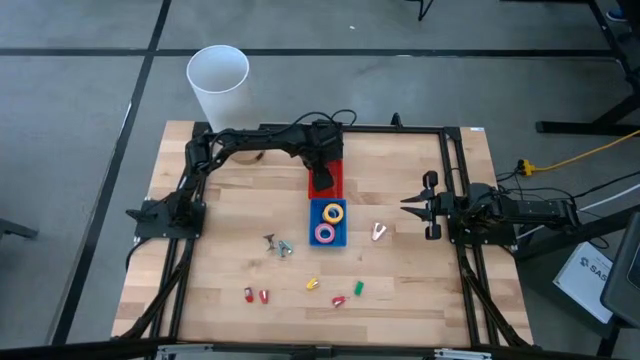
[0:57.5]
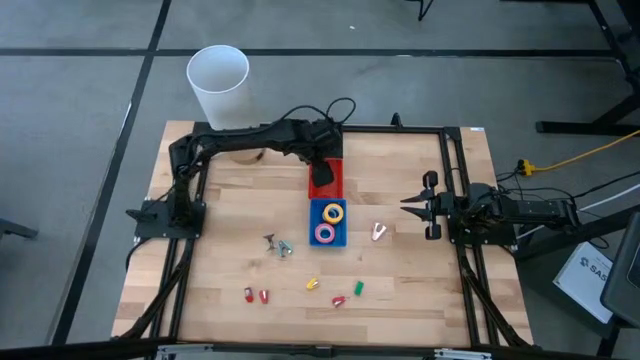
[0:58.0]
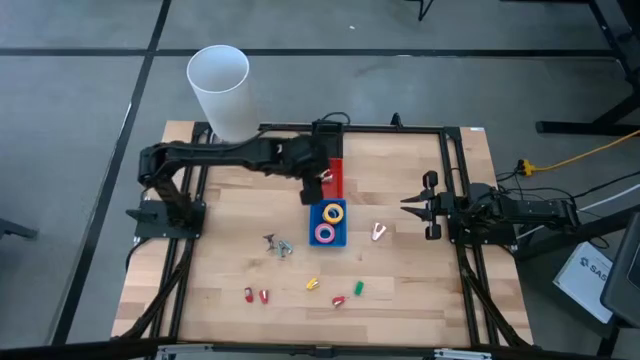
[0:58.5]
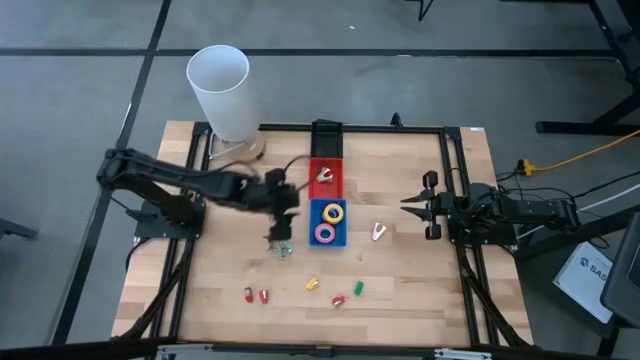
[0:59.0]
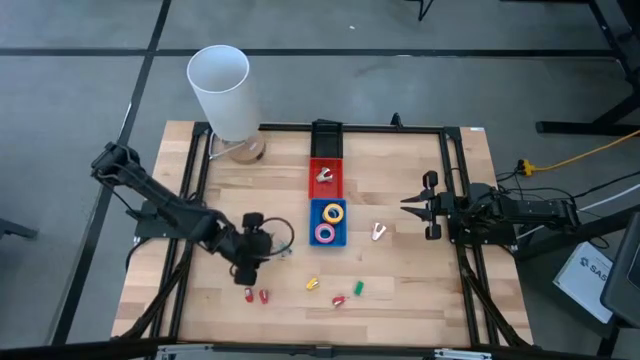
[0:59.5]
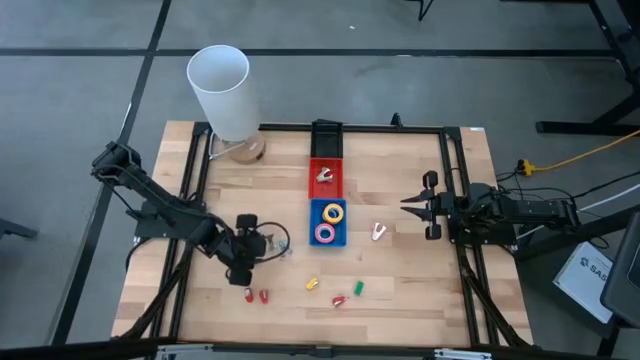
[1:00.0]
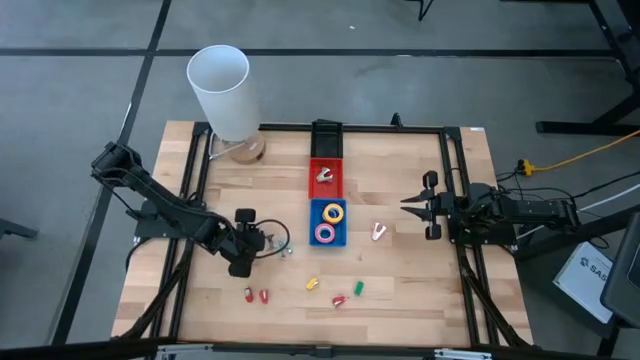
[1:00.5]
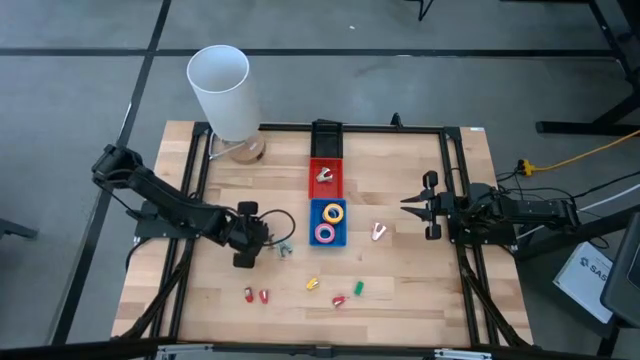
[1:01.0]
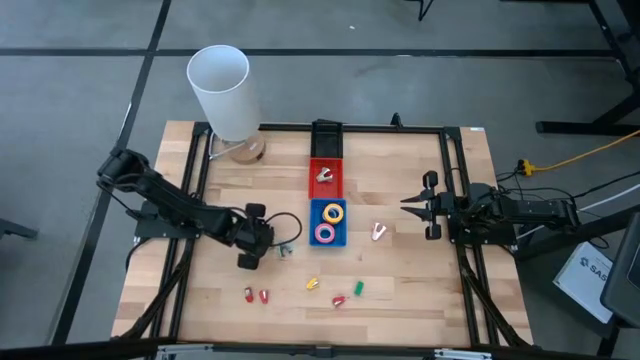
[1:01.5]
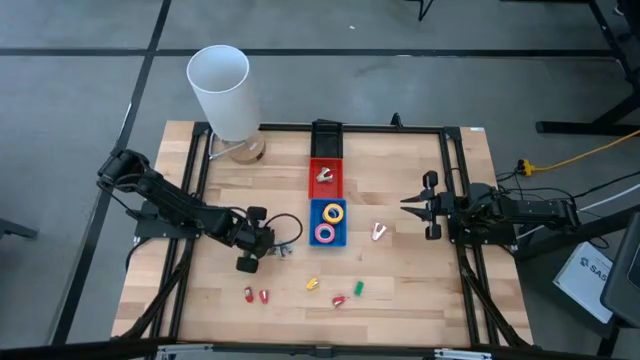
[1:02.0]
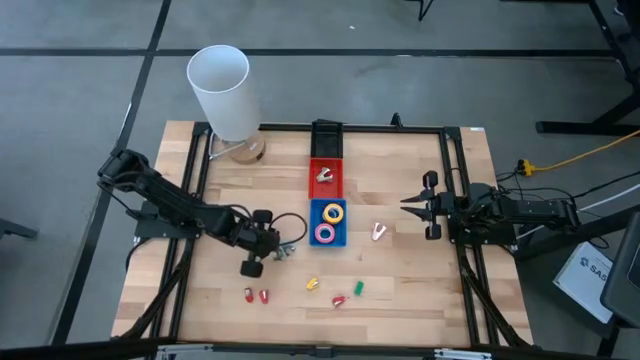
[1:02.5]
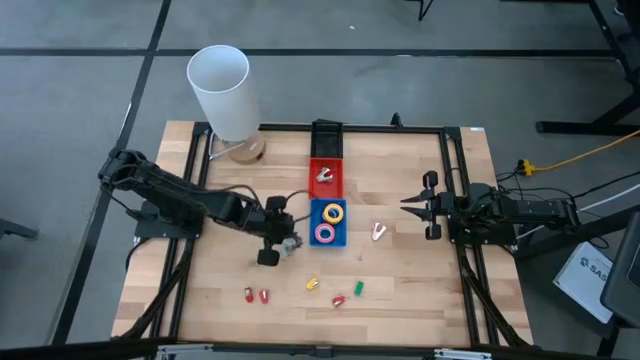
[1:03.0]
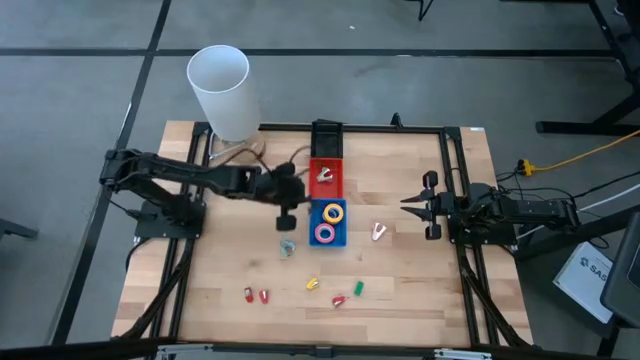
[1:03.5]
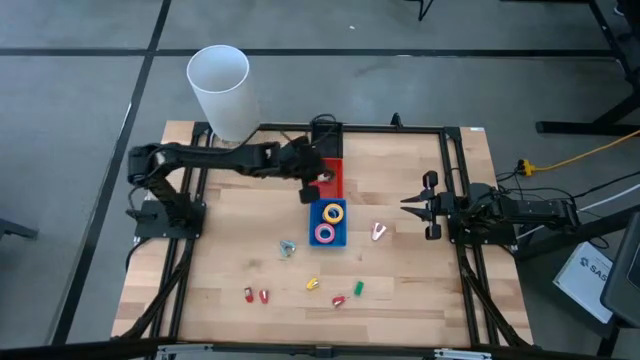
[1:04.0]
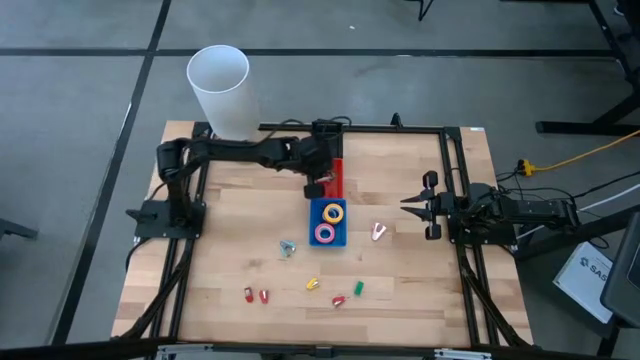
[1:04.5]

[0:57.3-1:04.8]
Task: Pick and place Stapler, Stapler remover, tape
Put the black staple remover into the red bin

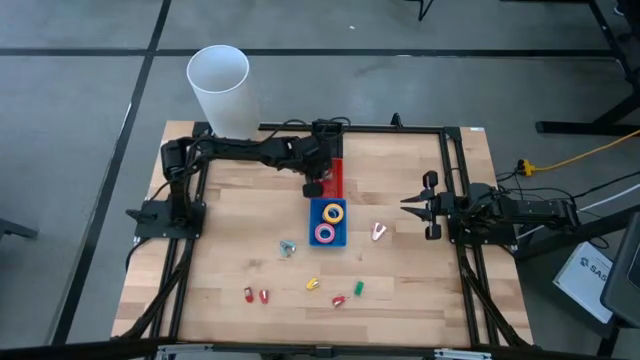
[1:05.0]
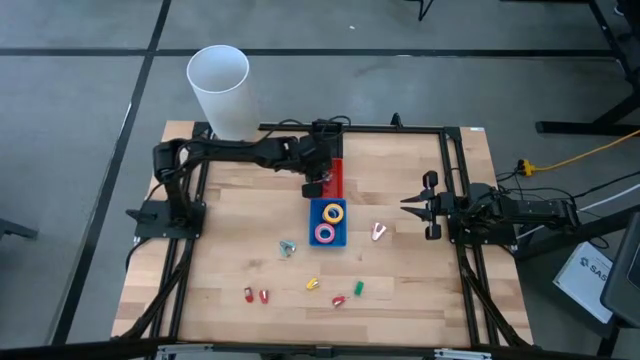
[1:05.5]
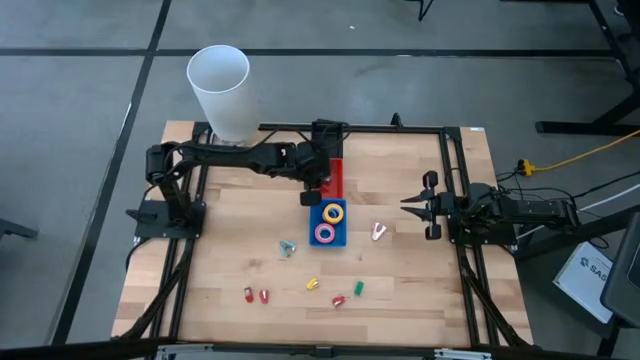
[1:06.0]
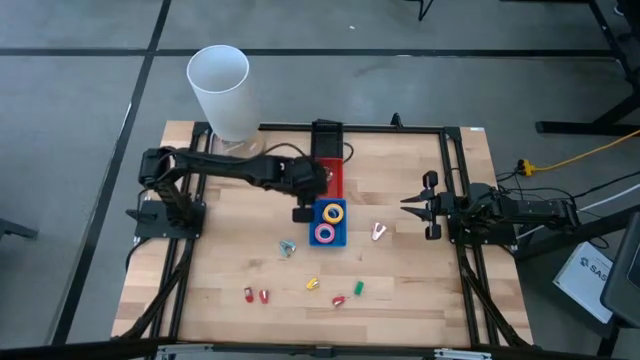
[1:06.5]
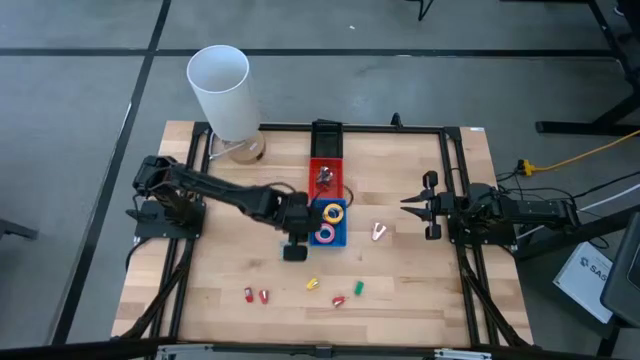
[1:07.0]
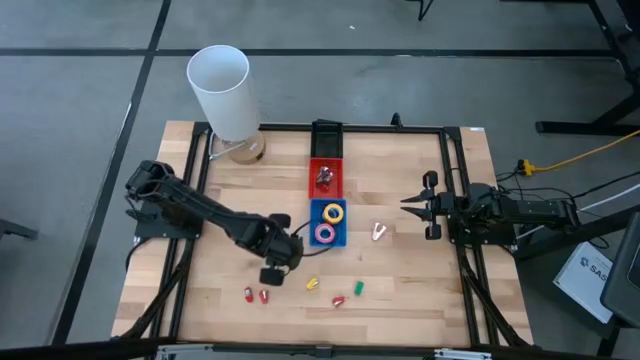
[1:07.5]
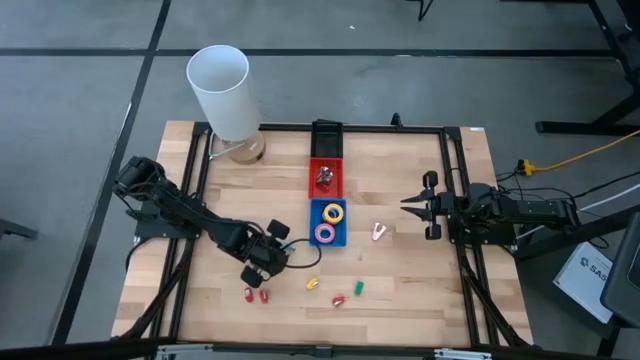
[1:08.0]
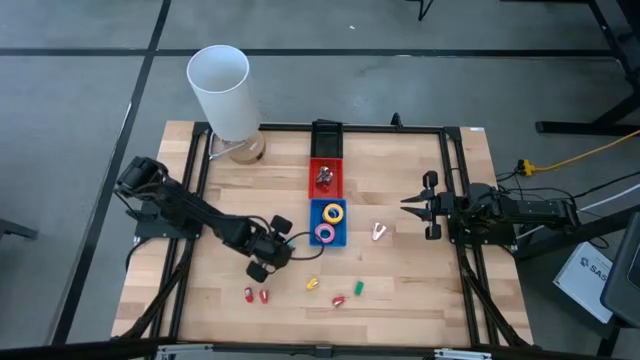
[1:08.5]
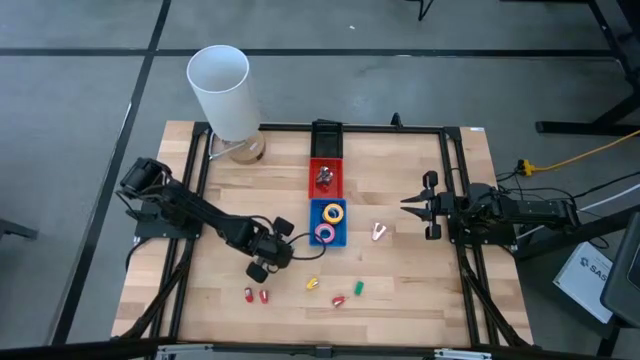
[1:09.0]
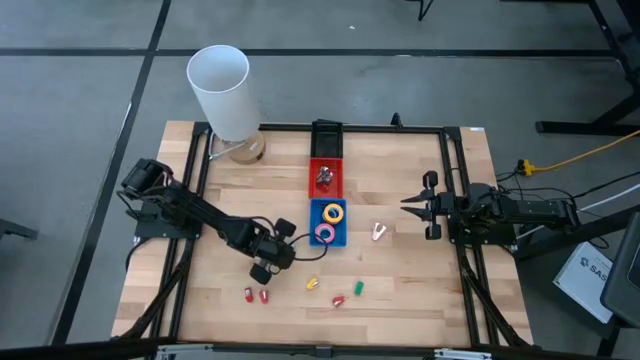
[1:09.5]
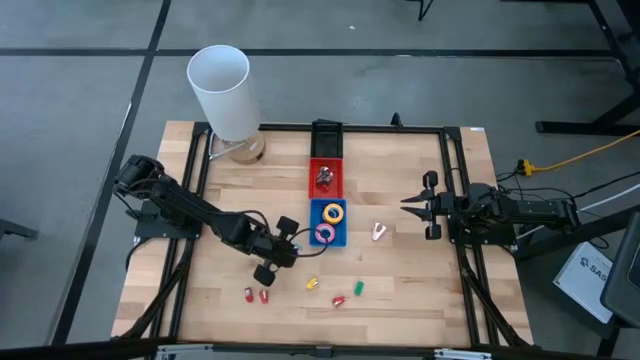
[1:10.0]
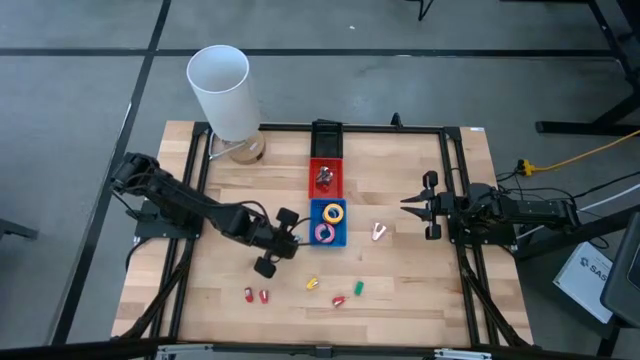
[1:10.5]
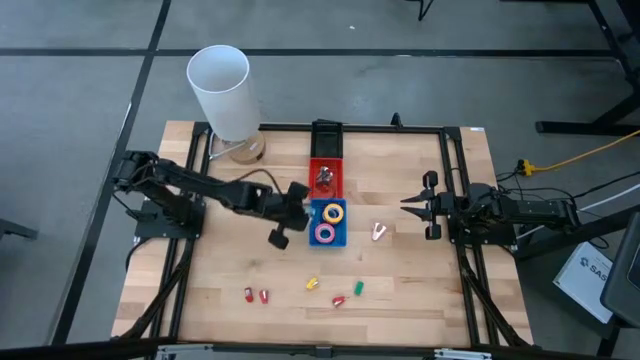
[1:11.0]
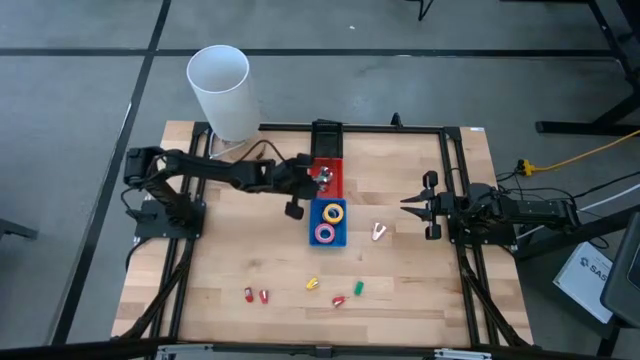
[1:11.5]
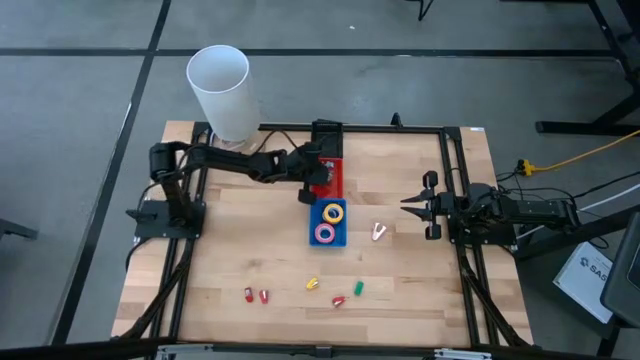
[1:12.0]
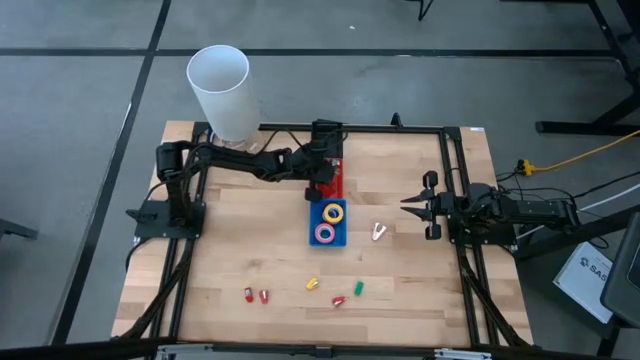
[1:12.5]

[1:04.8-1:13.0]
Put the blue staple remover into the red bin

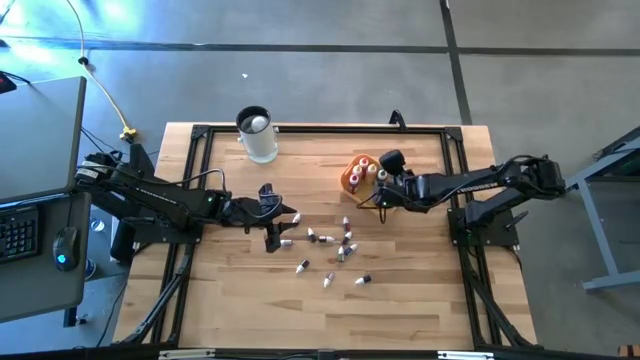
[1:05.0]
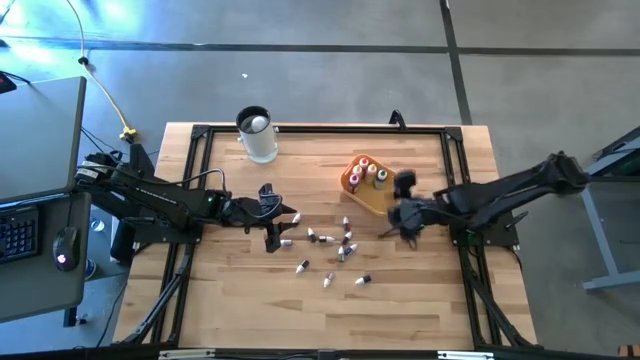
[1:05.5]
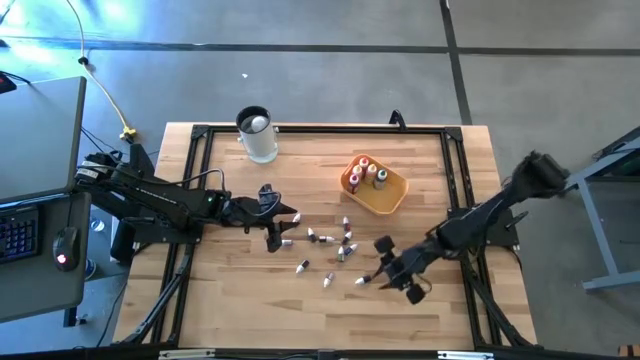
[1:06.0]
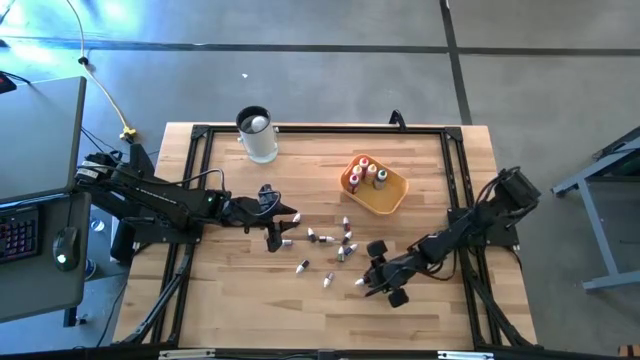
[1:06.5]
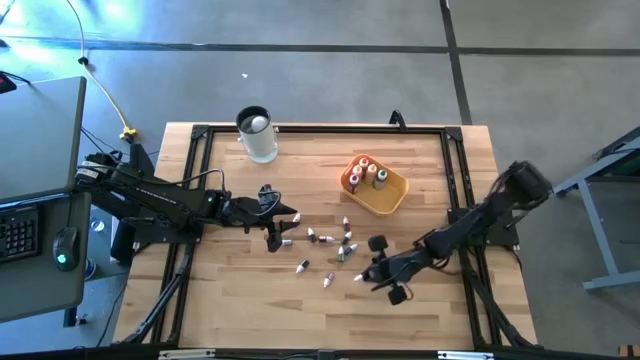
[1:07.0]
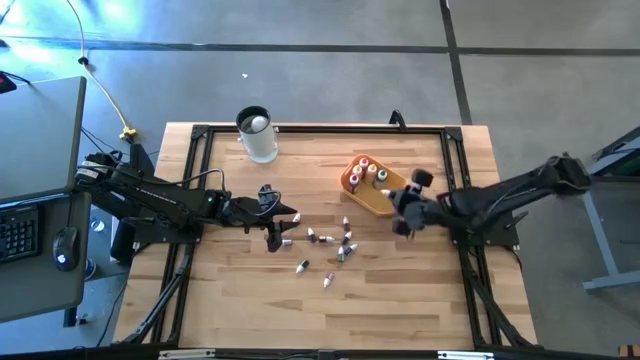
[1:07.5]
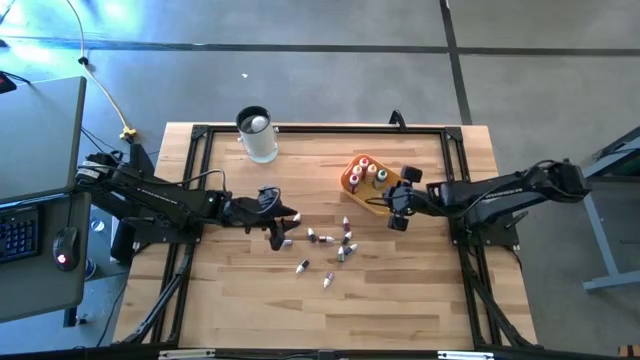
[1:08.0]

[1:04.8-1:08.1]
Task: Pick & Place food coloring
Put the small black food coloring bottle into the yellow bin

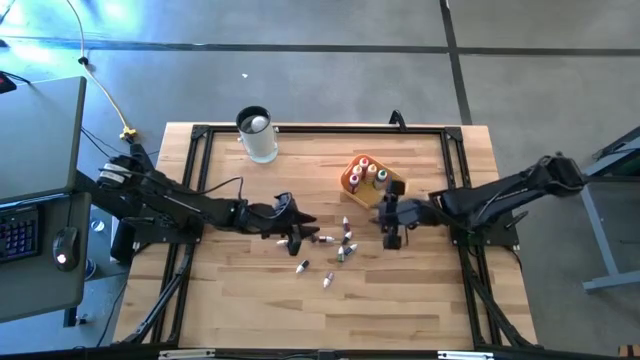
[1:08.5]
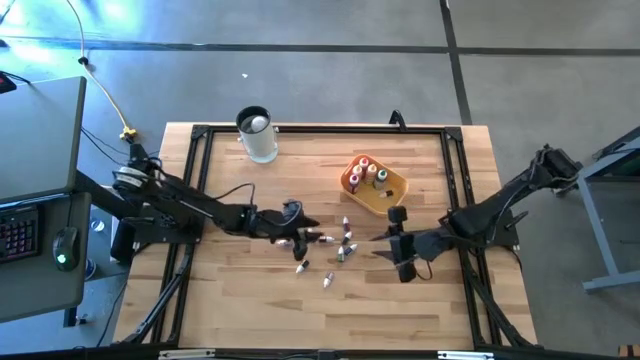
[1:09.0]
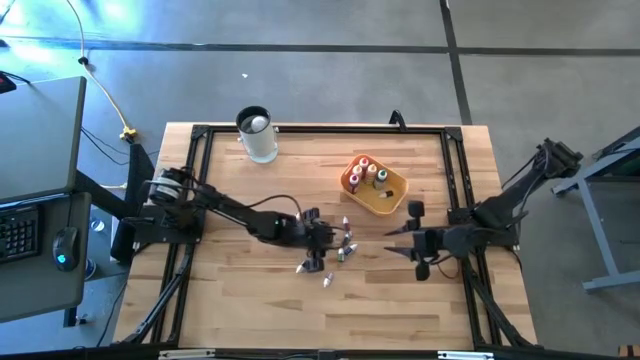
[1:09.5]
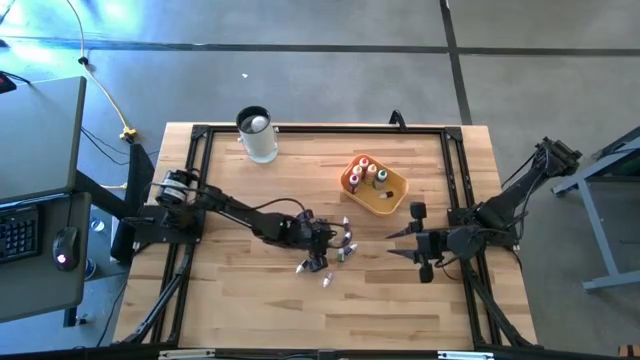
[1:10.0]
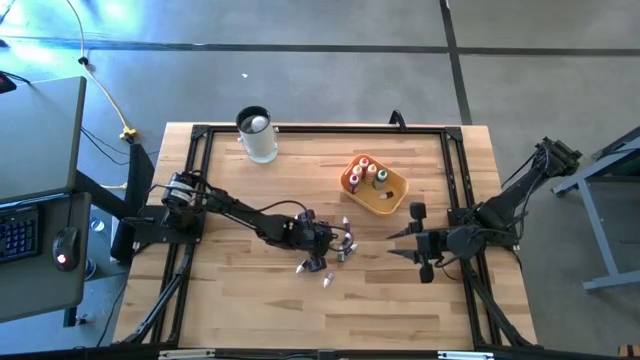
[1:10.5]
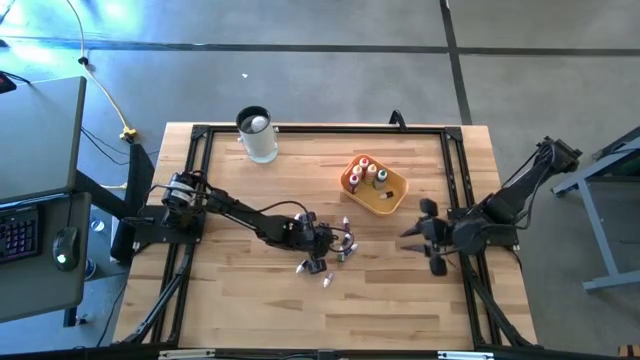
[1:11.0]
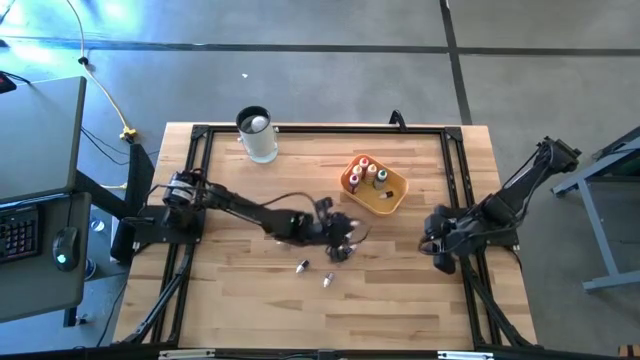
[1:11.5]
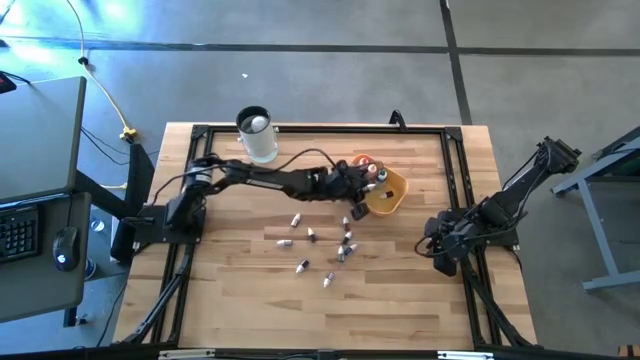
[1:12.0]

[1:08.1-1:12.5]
Put the small red food coloring bottle into the yellow bin
